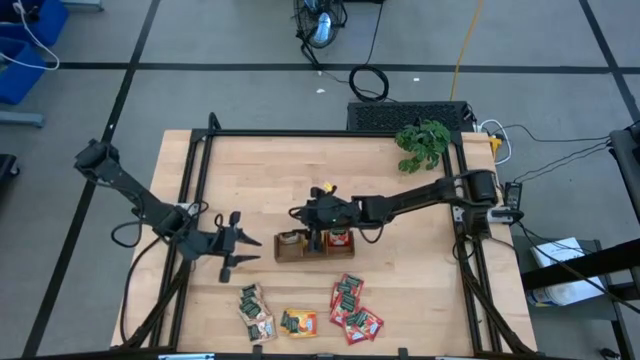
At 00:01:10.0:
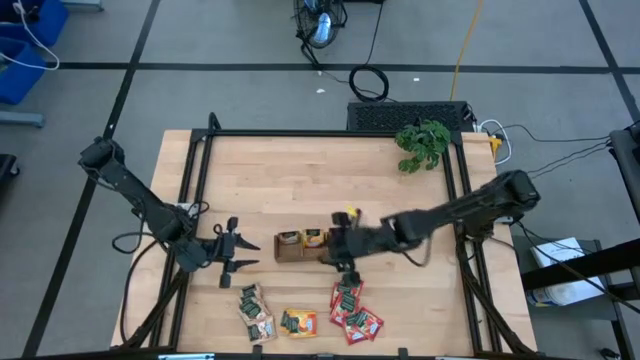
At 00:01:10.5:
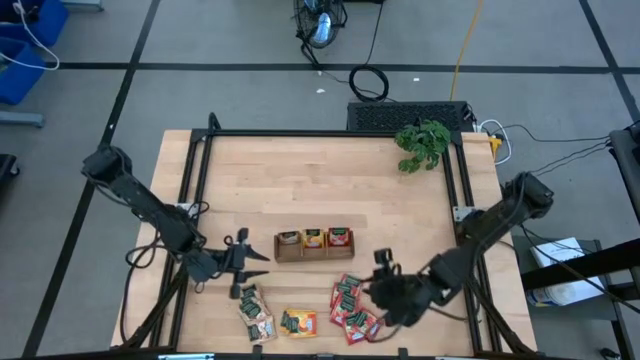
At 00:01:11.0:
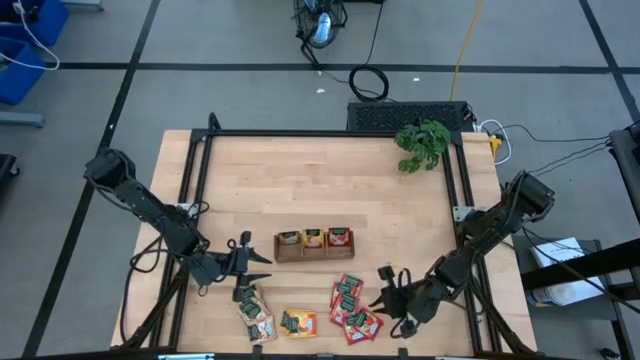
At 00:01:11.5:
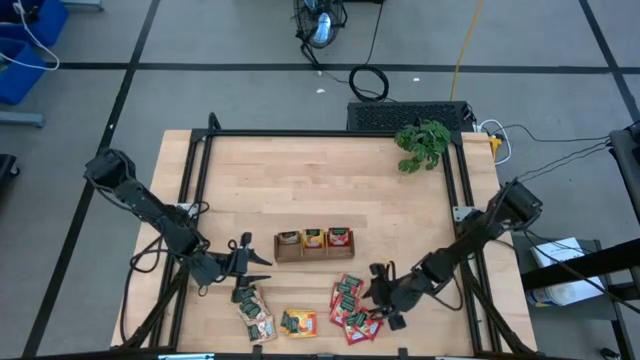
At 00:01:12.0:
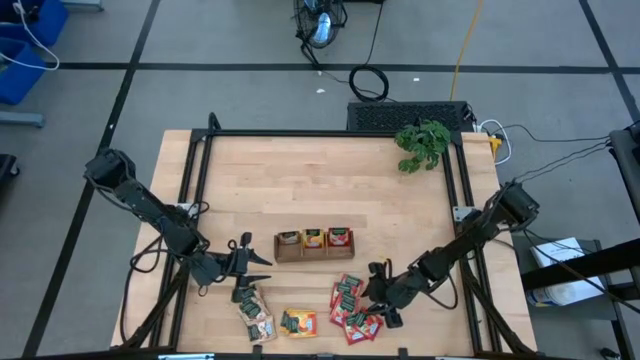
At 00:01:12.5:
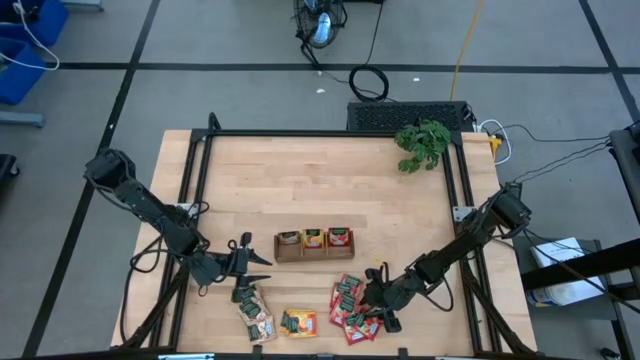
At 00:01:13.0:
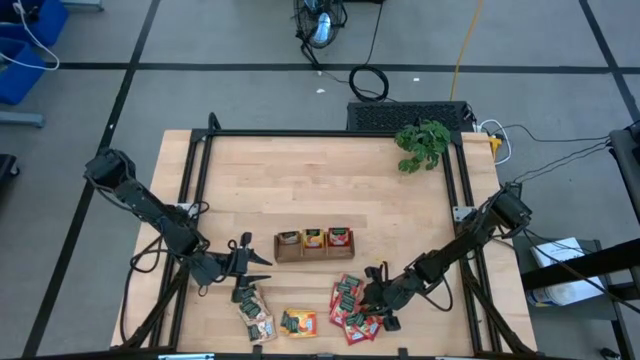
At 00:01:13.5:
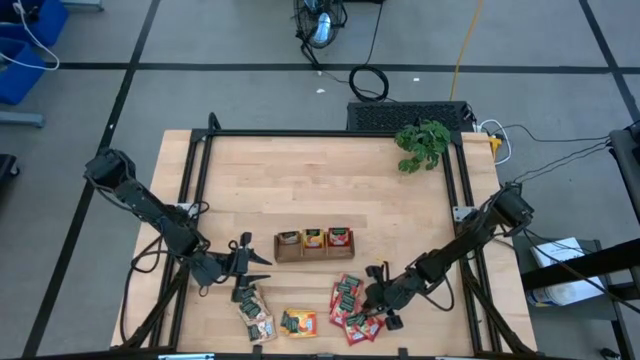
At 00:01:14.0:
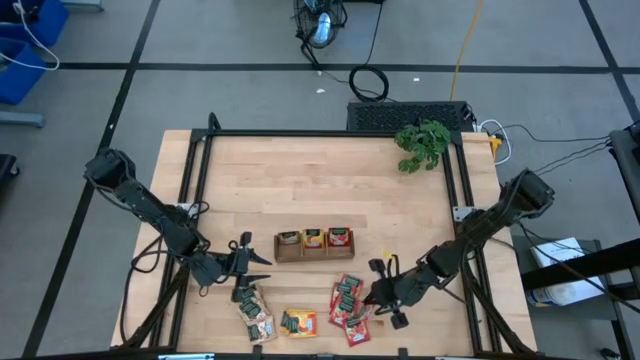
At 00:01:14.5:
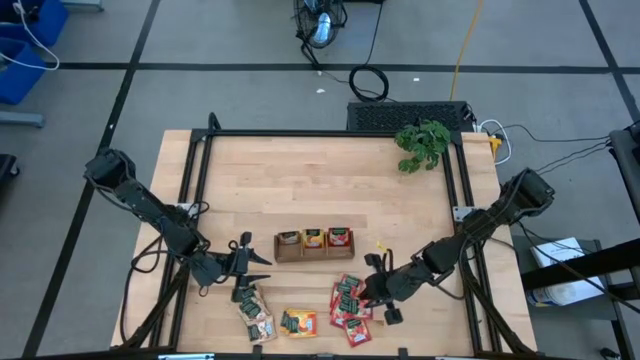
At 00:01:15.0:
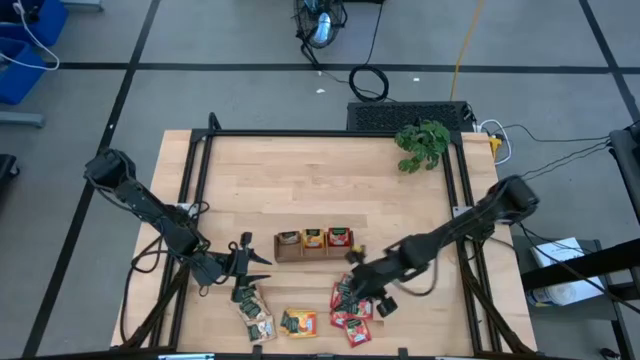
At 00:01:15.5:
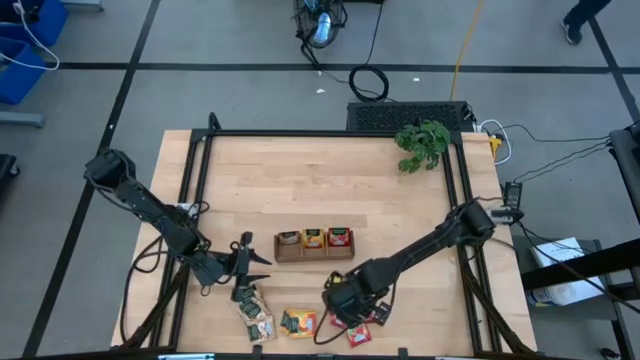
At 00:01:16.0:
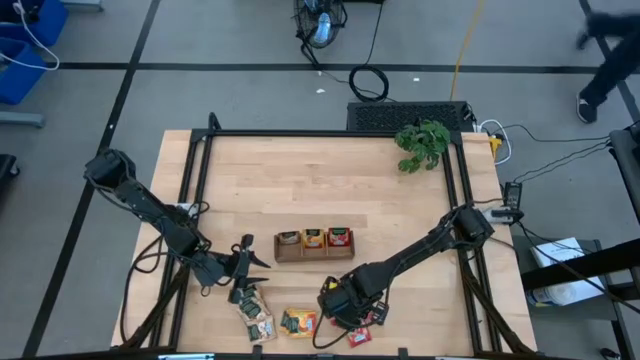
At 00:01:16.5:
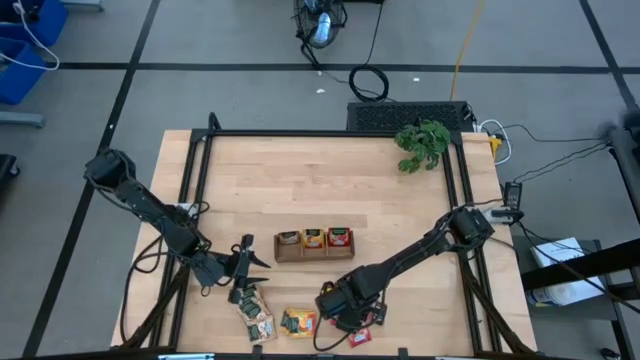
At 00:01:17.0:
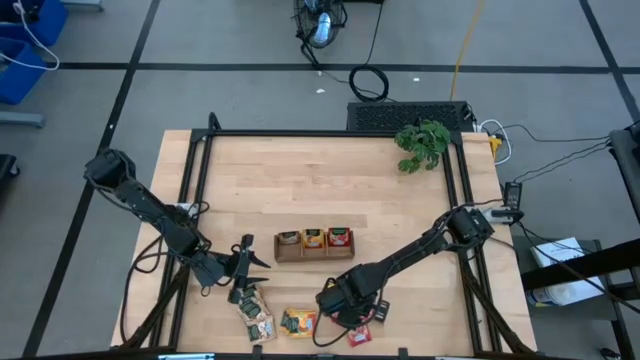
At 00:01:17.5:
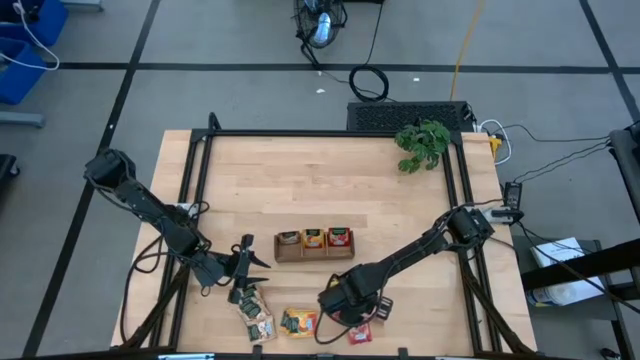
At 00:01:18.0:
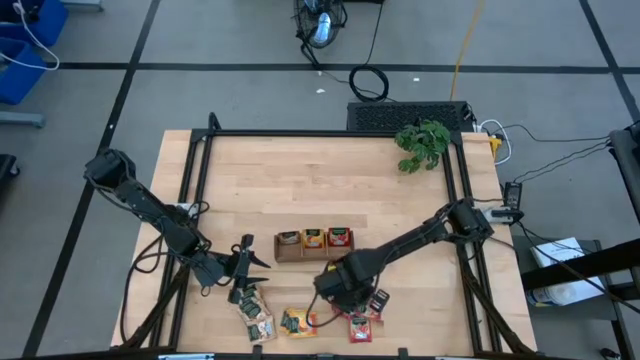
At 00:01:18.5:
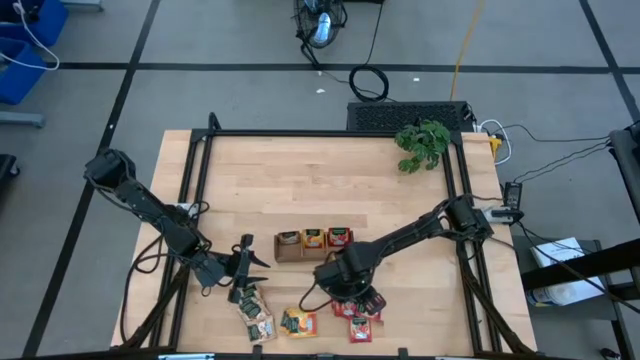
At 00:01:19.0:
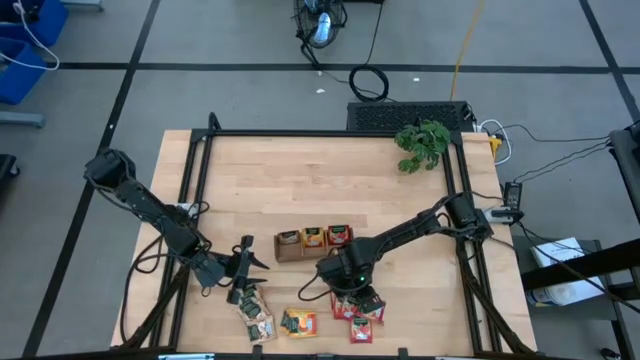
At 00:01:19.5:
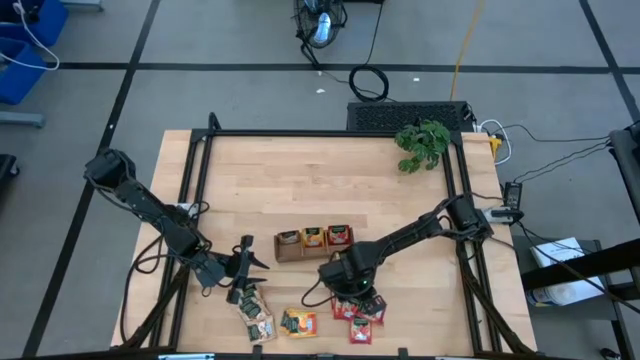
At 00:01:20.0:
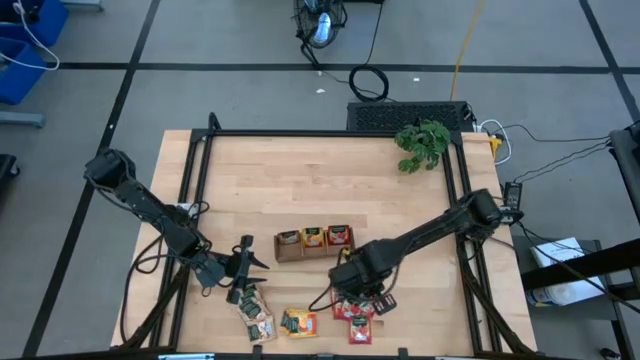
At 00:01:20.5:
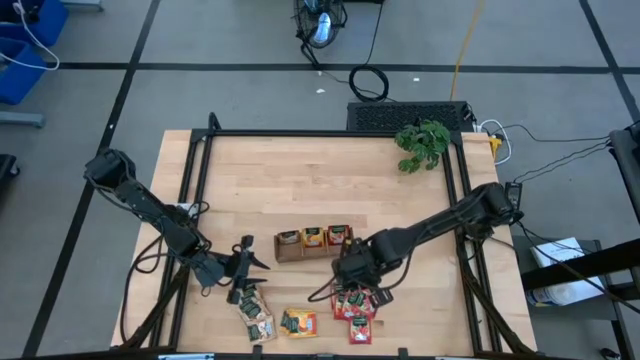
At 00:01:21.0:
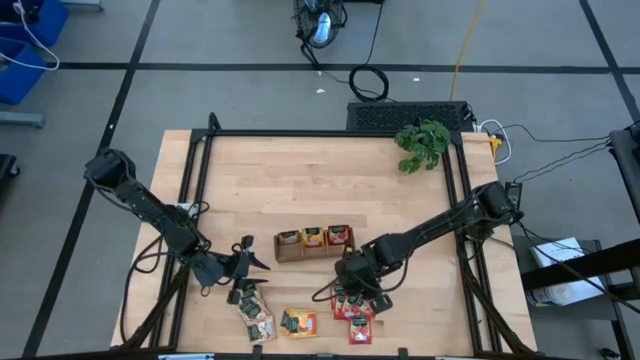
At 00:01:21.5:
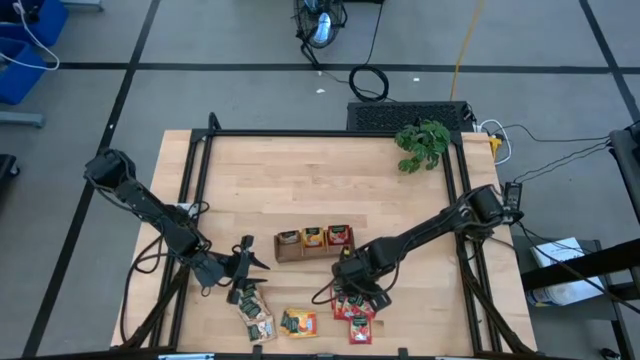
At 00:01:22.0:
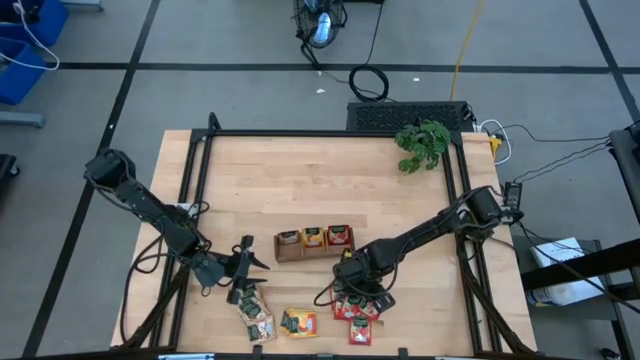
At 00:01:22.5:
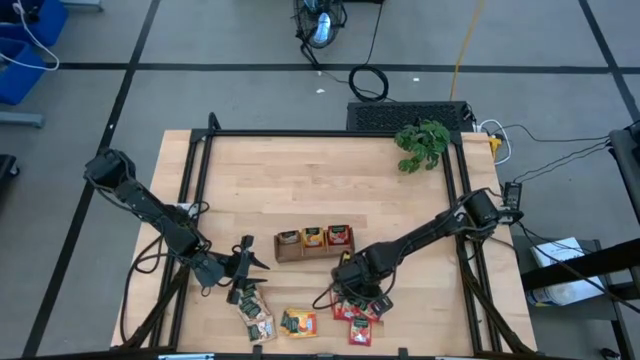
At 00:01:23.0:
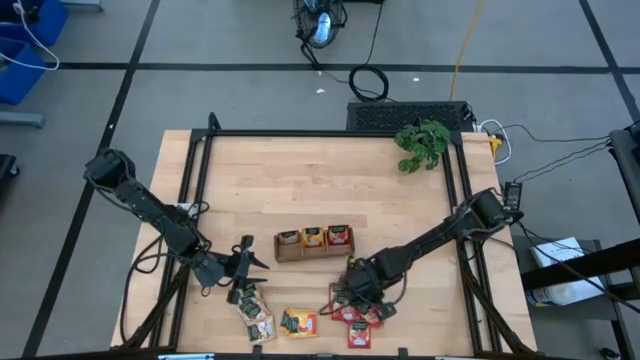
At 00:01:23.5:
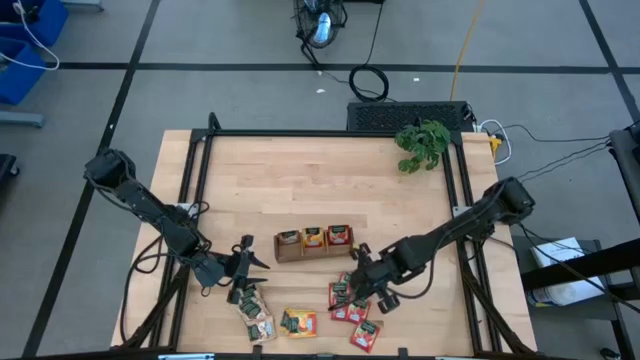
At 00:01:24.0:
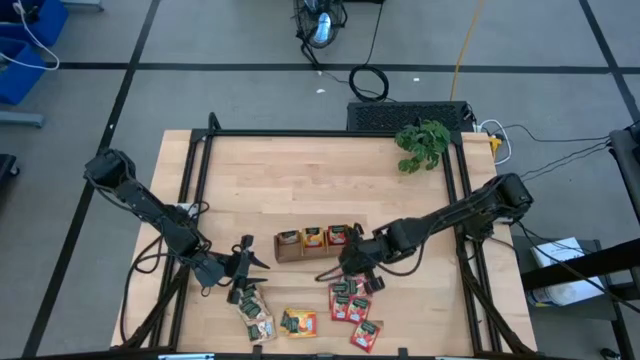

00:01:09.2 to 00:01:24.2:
Task: Pick & Place Tea
Put the red tea bag into the right section of the wooden organizer

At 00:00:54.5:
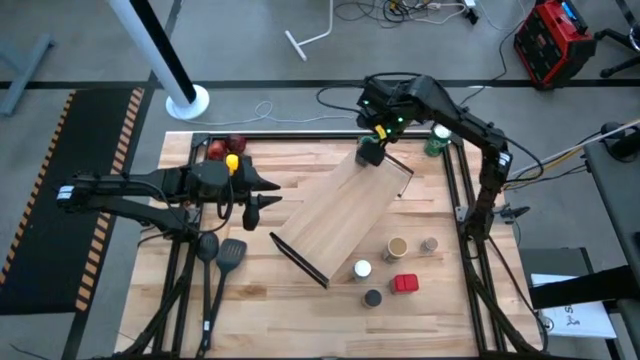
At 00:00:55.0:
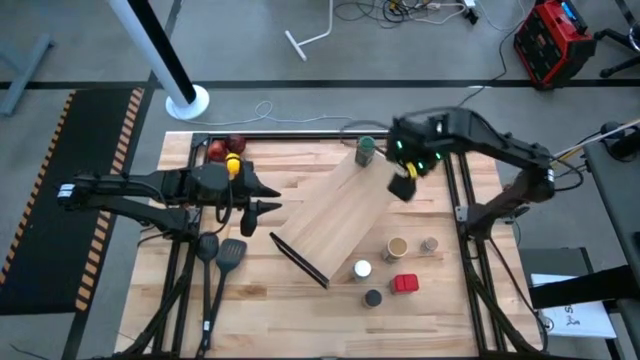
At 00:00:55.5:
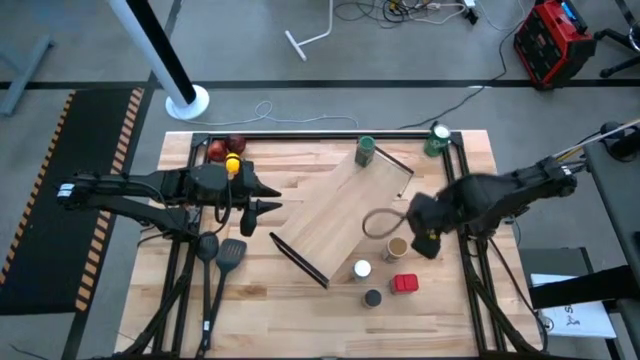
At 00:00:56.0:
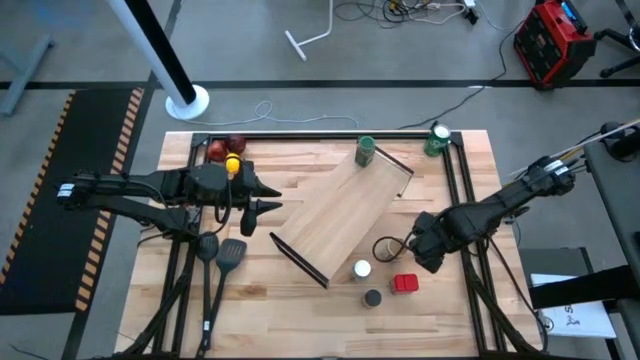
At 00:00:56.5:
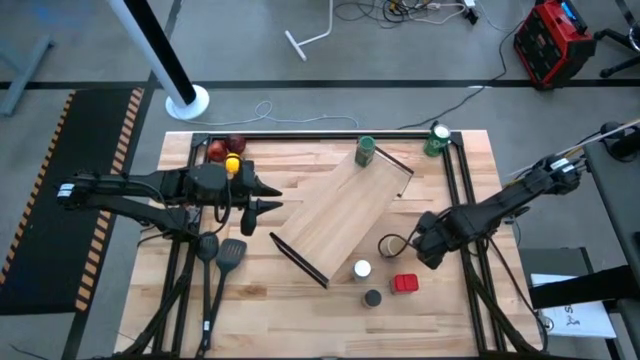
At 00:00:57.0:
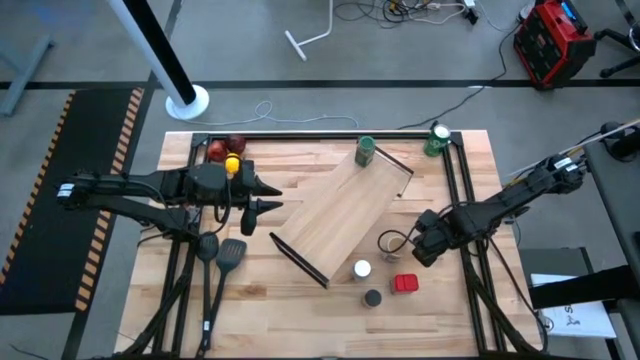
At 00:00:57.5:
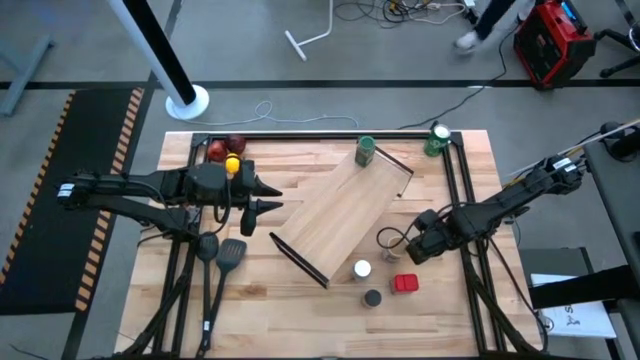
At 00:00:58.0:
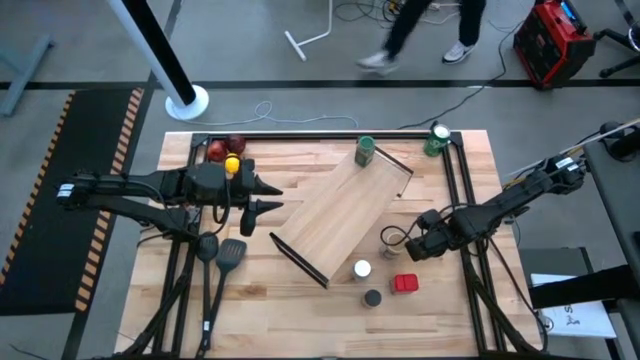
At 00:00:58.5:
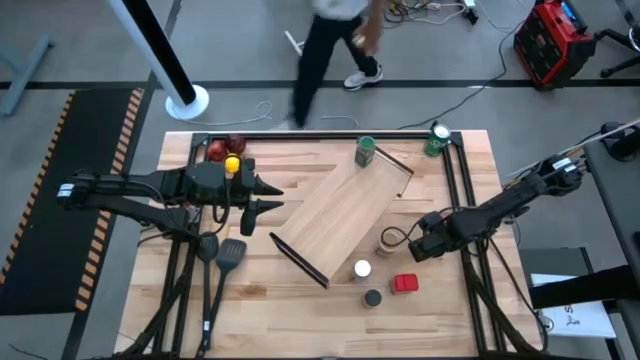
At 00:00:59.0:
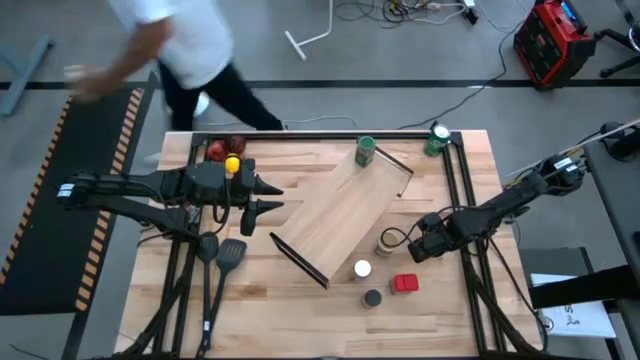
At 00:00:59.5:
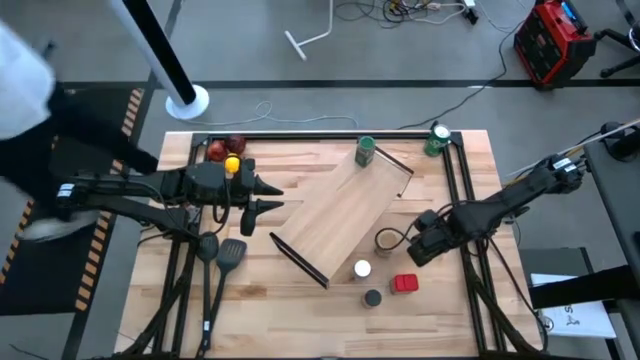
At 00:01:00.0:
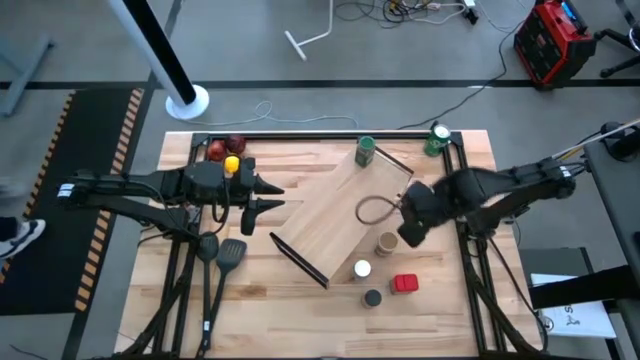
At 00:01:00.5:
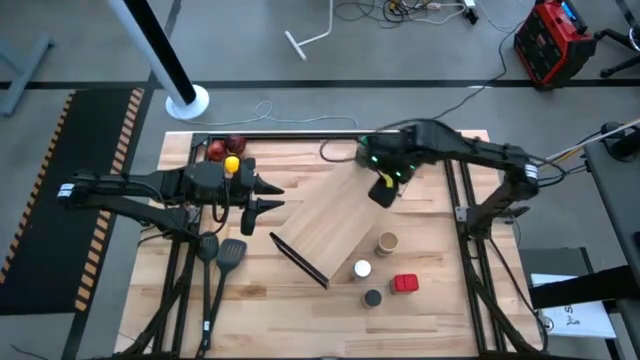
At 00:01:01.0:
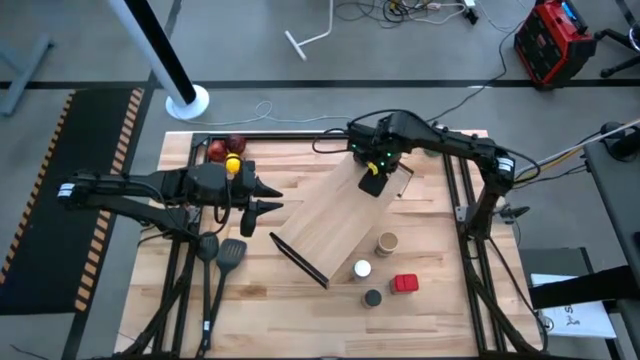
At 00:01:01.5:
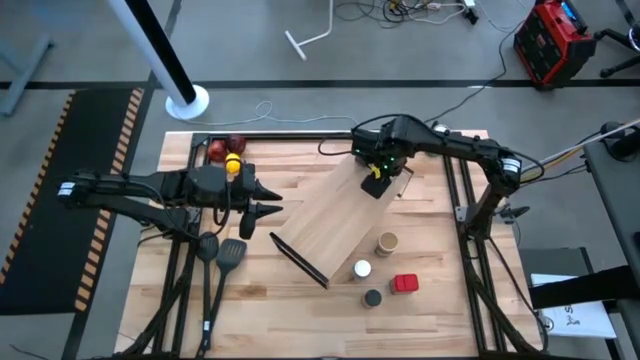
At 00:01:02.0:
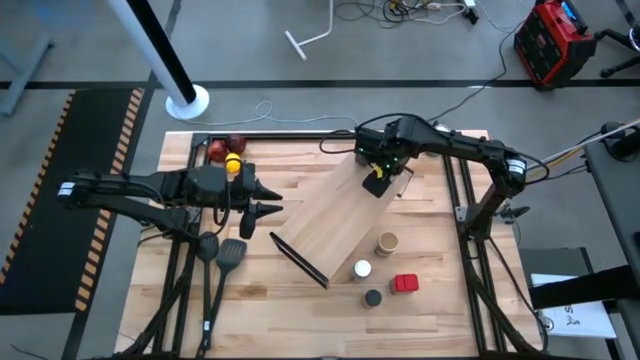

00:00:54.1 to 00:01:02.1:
Task: Shelf spices
Put the brown seasoning bottle on the shelf aligned with the green seasoning bottle
